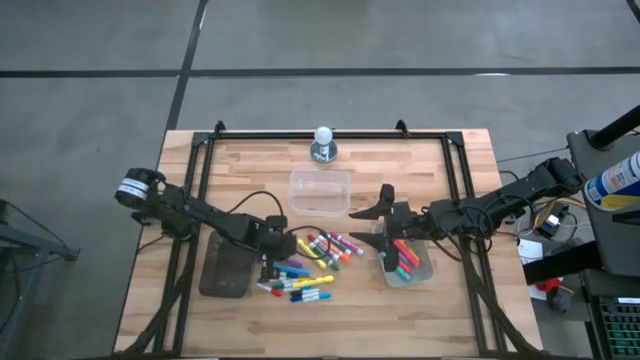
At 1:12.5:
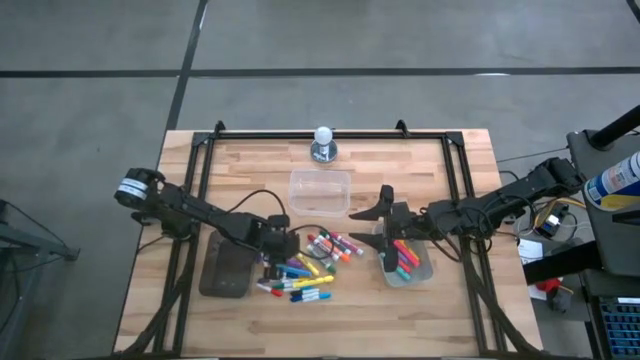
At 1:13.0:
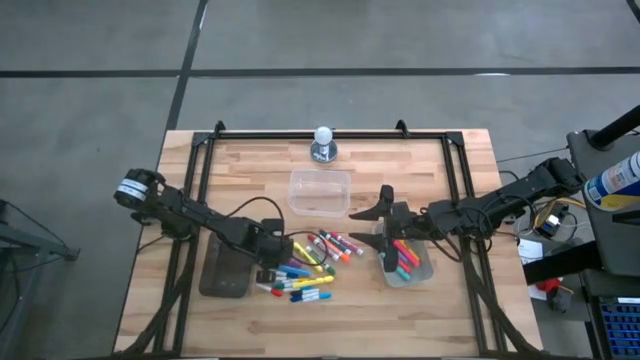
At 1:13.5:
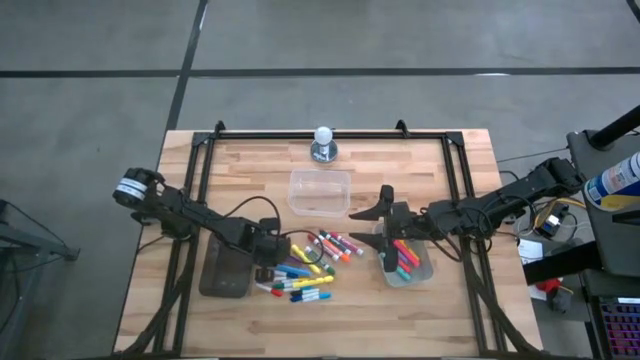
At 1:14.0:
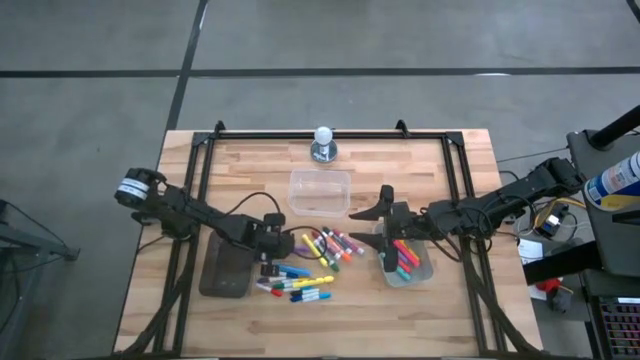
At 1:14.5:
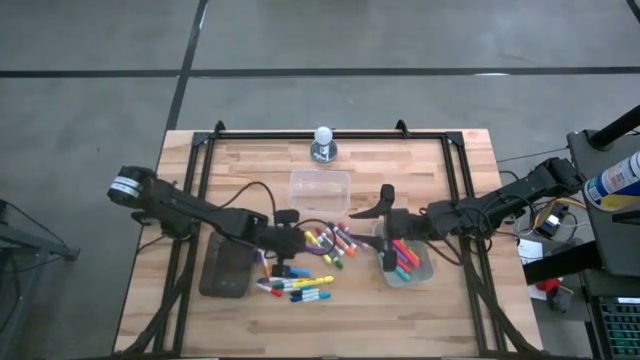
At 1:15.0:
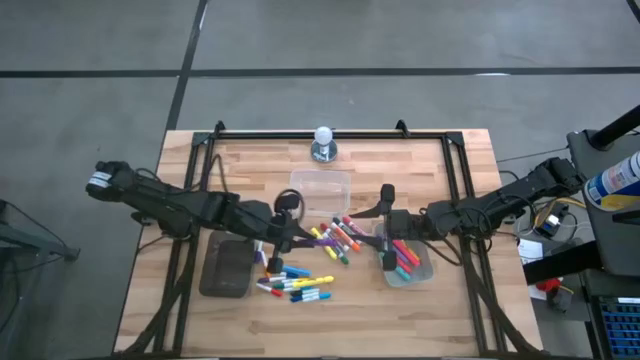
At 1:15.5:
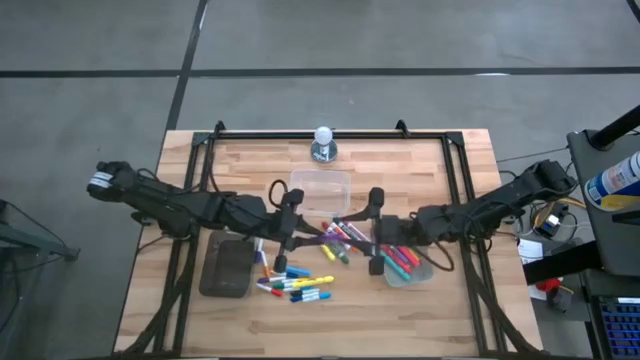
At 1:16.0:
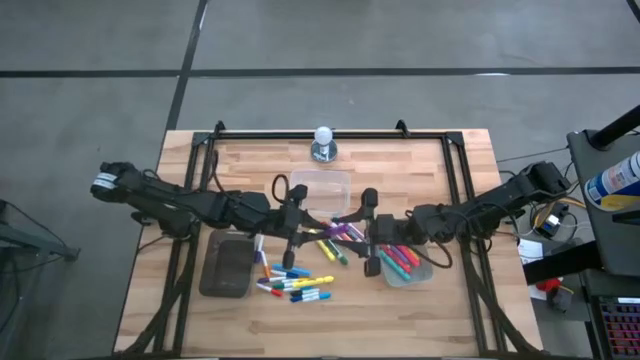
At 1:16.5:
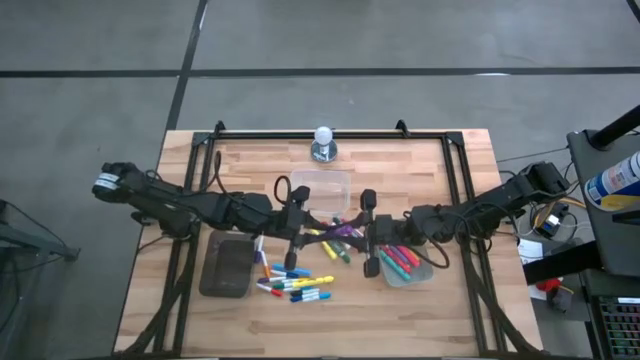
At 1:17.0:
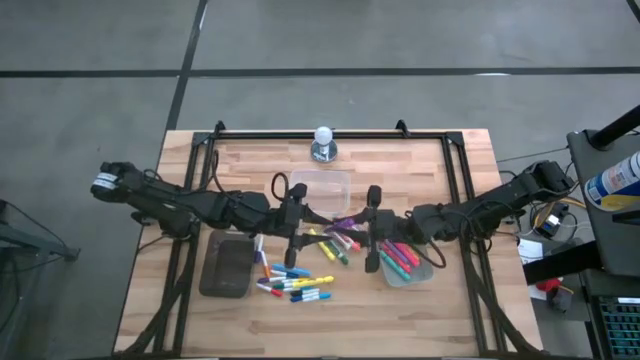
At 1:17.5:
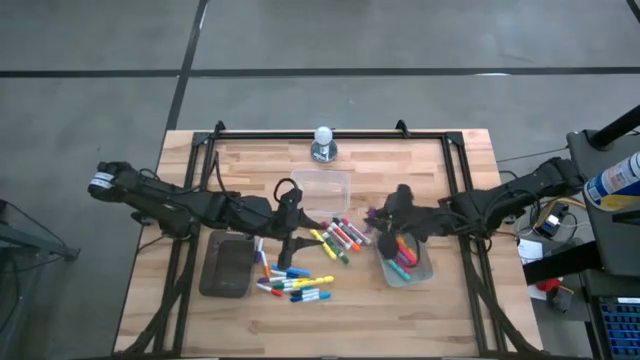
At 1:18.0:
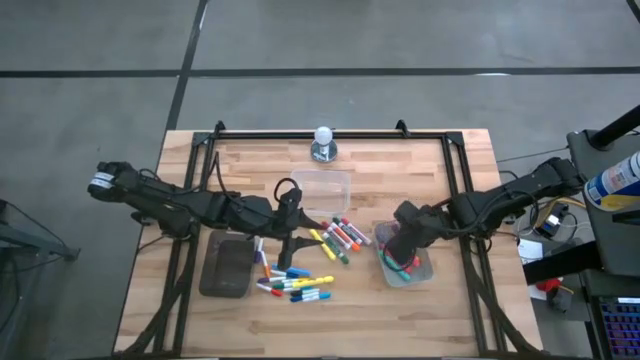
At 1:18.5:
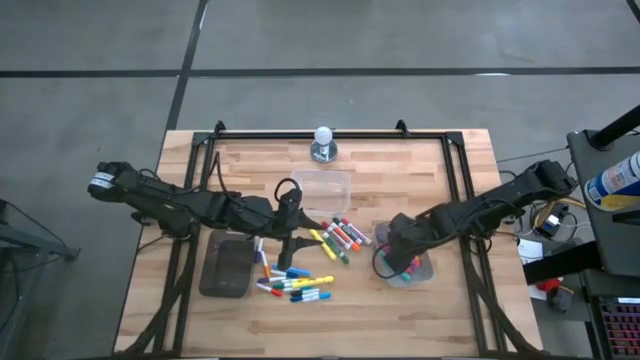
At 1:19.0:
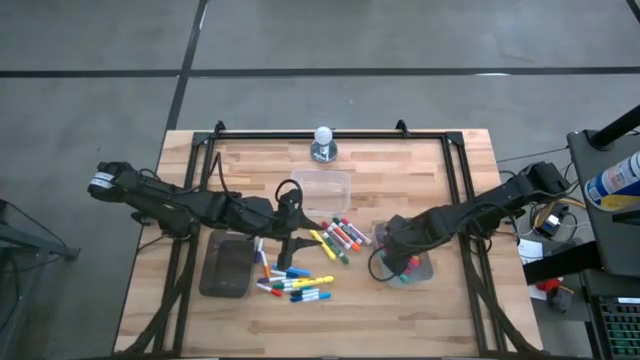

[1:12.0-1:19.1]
Task: Pick & Place Markers
Put the purple highlighter into the gray bin

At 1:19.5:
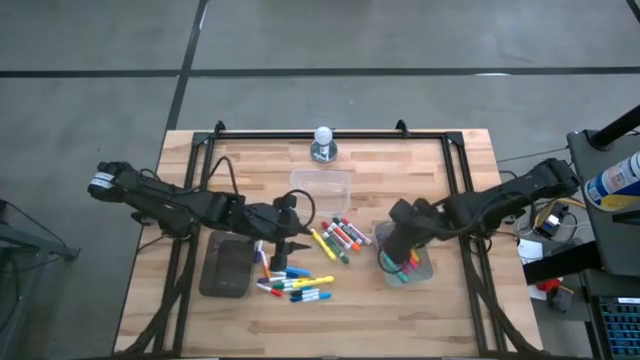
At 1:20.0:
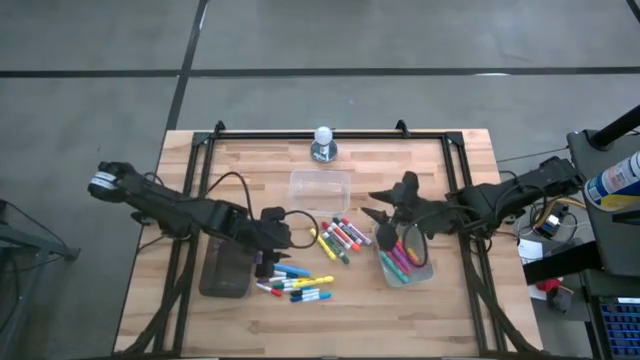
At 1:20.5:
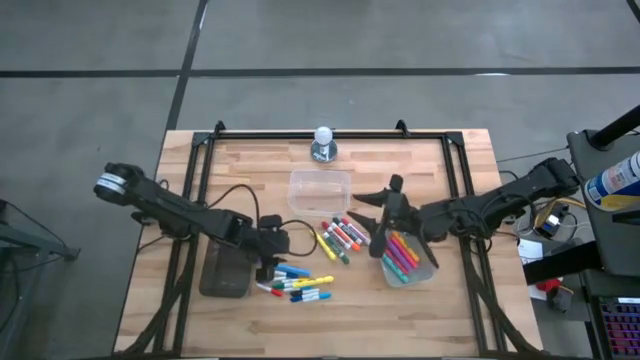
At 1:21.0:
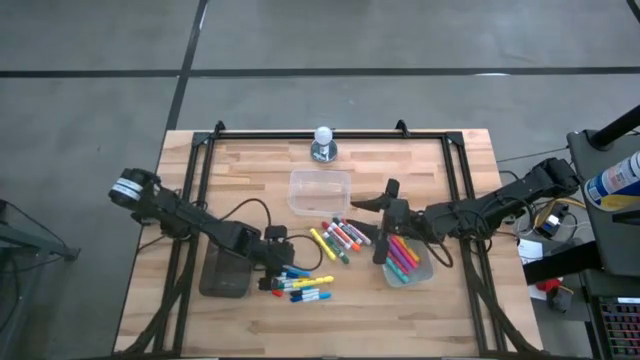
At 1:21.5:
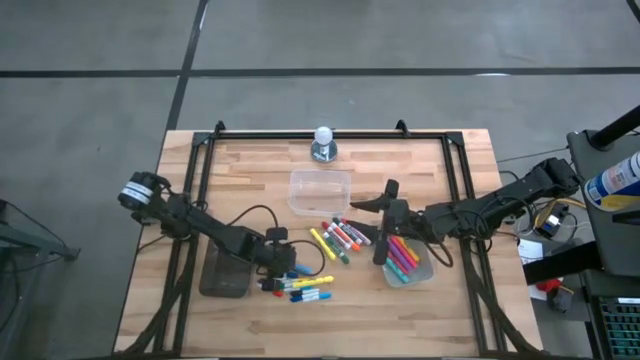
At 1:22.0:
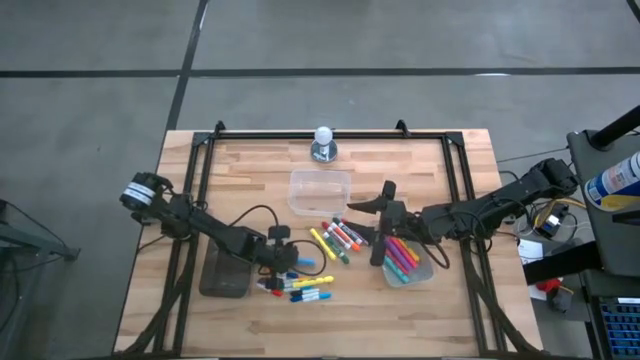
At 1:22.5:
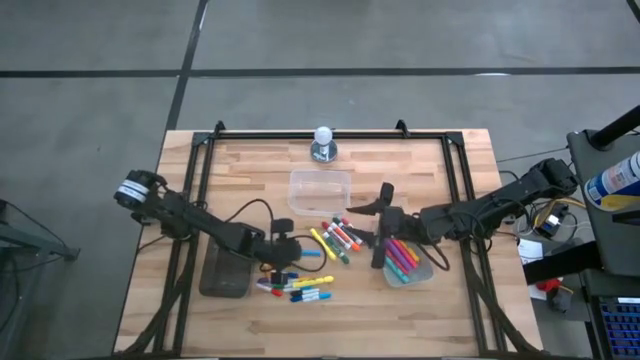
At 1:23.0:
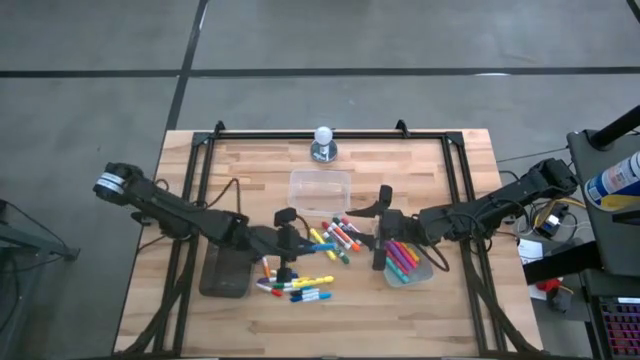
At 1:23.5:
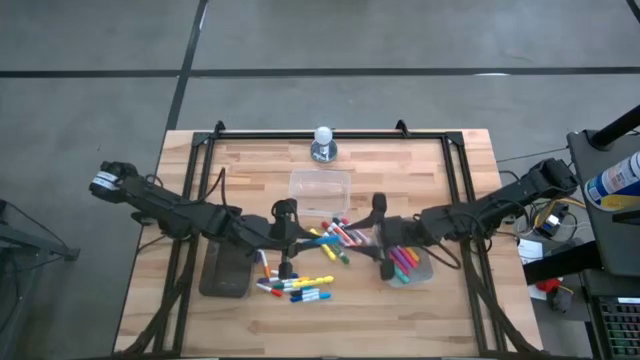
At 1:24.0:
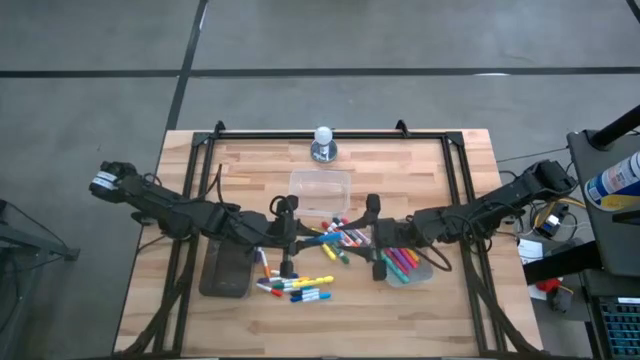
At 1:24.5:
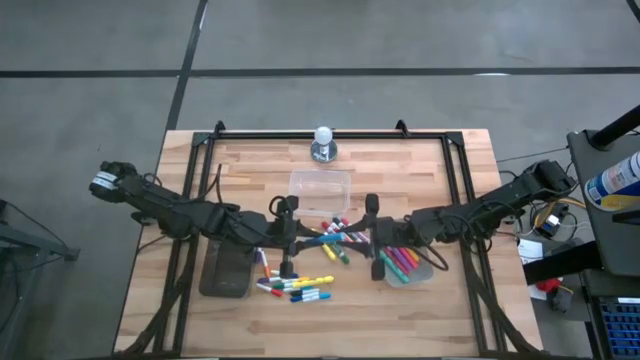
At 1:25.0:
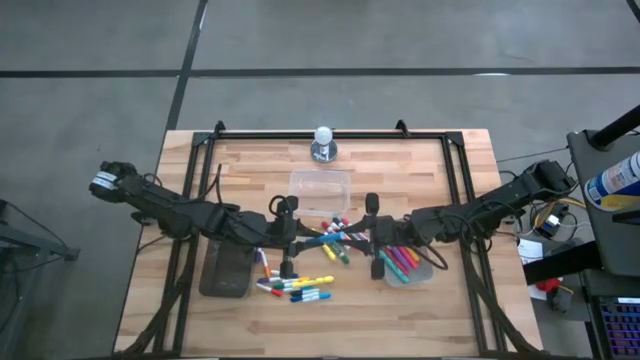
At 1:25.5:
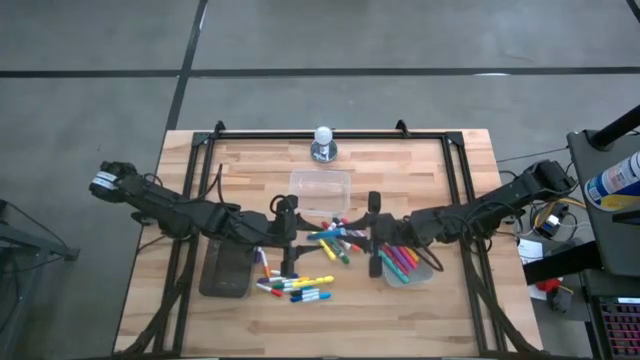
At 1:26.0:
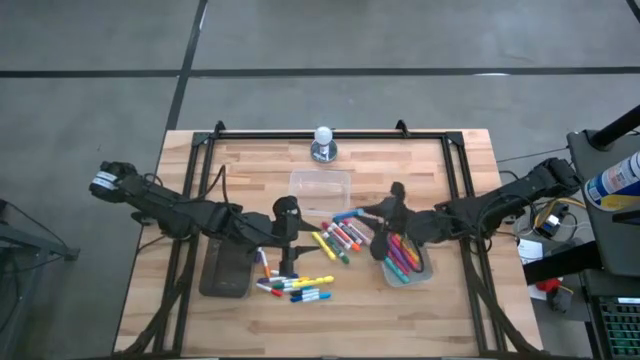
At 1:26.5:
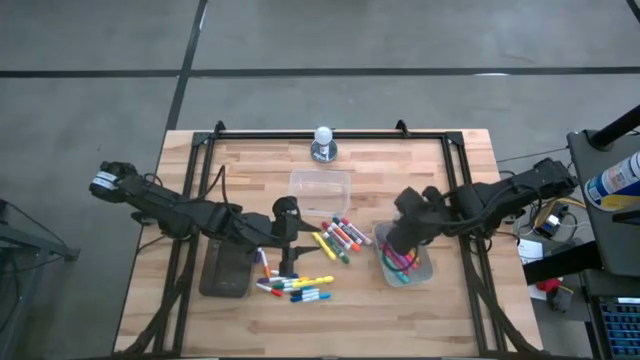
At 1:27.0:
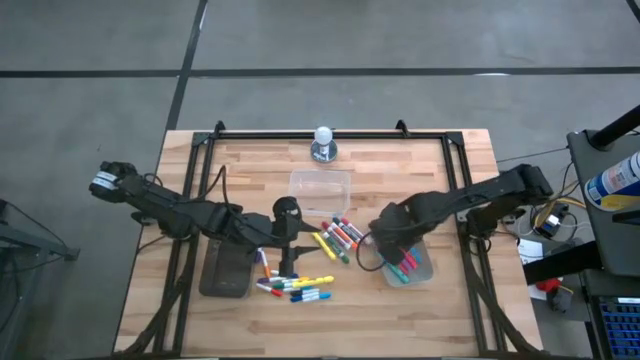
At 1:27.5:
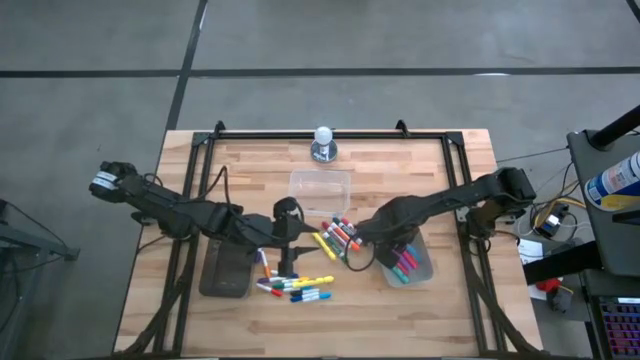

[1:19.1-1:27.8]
Put the blue highlighter into the gray bin

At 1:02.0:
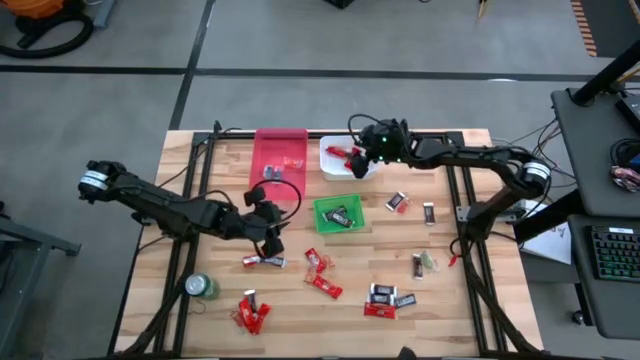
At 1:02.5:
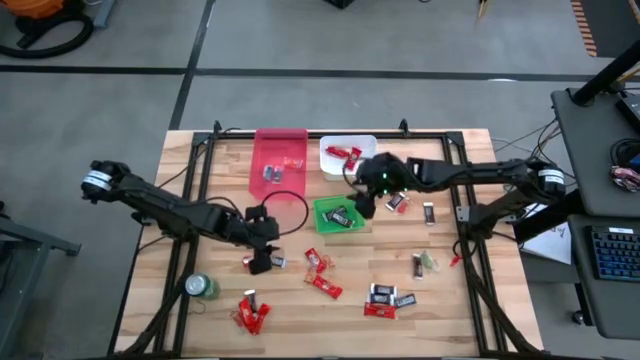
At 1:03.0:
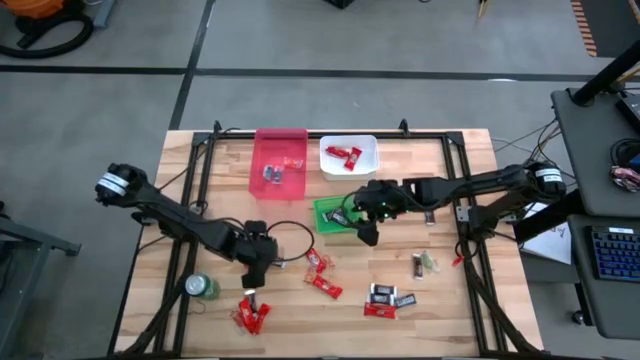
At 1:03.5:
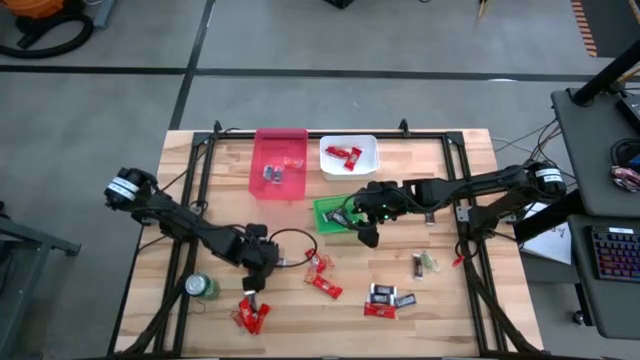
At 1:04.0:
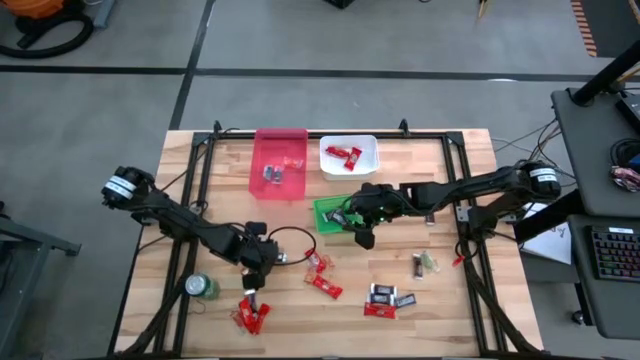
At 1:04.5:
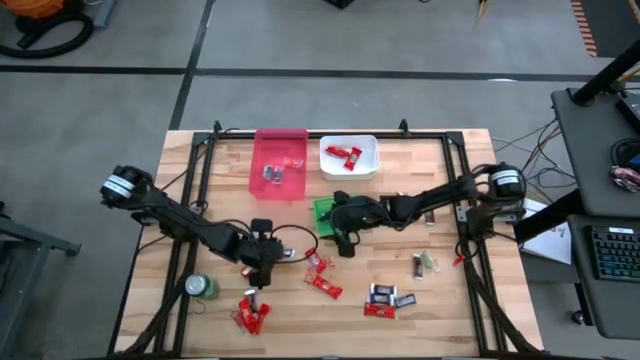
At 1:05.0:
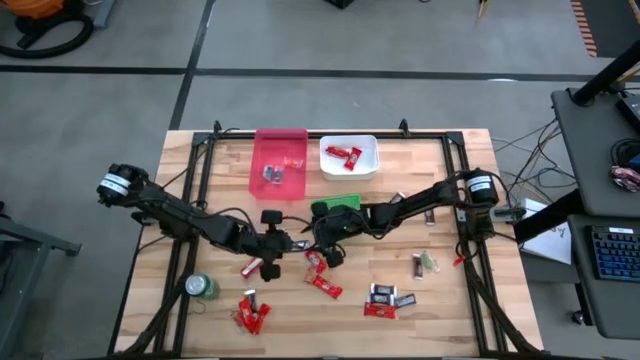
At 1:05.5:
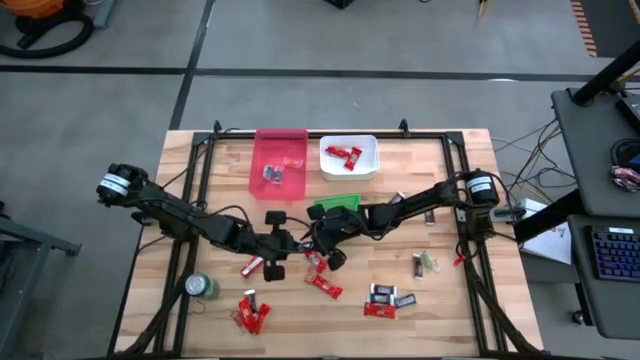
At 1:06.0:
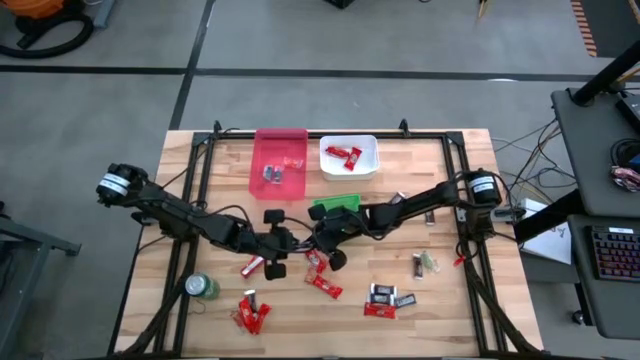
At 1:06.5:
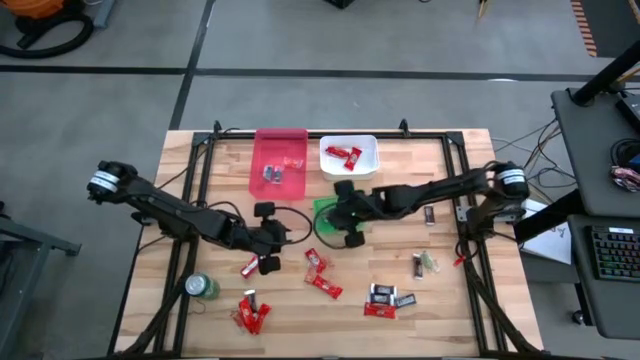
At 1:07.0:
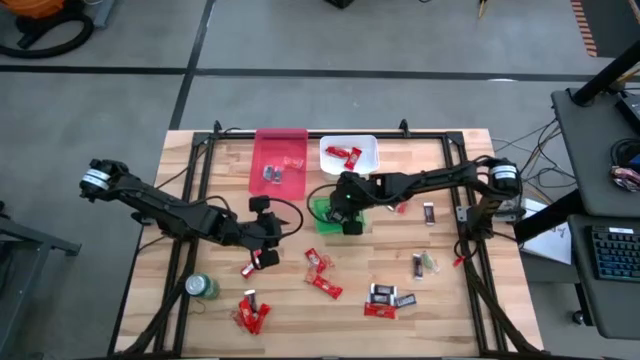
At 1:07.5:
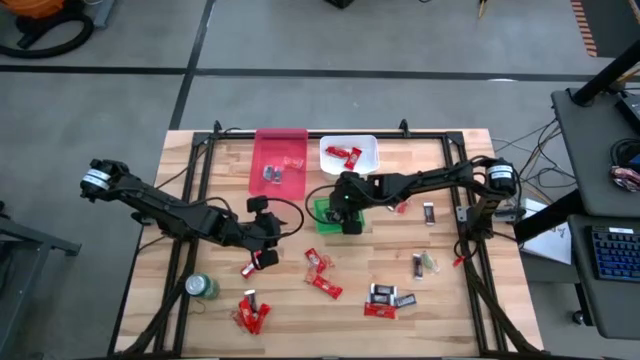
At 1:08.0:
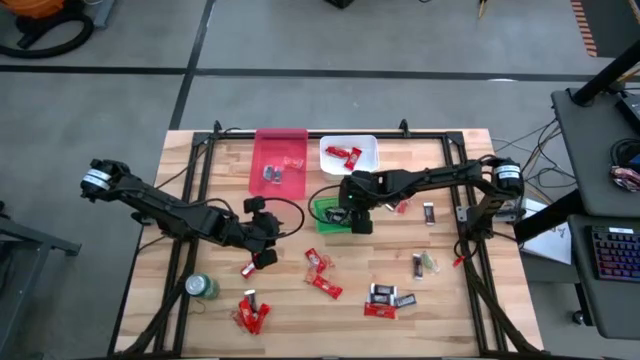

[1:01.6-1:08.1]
Task: Sort candy
Put the brown chocolate bar into the green bin
